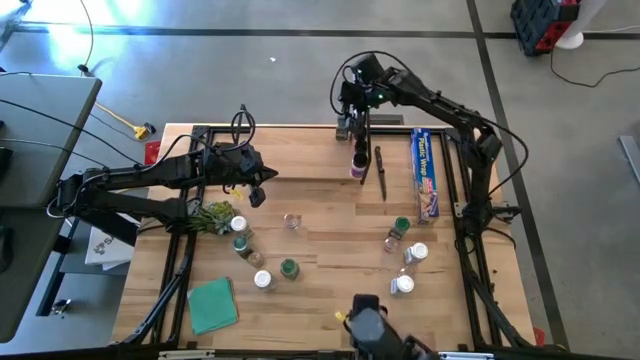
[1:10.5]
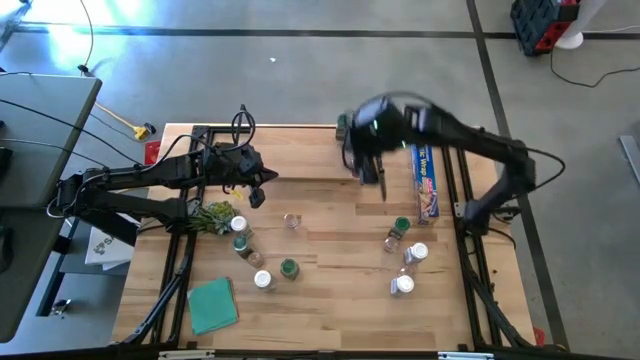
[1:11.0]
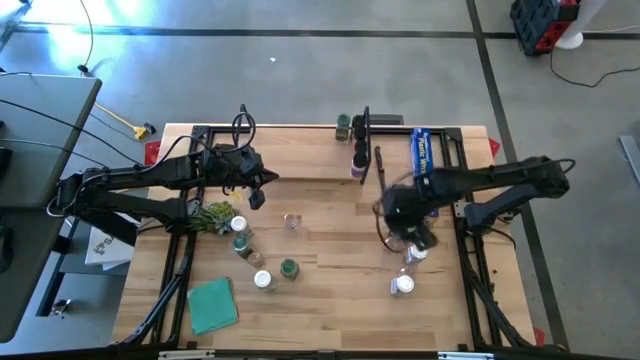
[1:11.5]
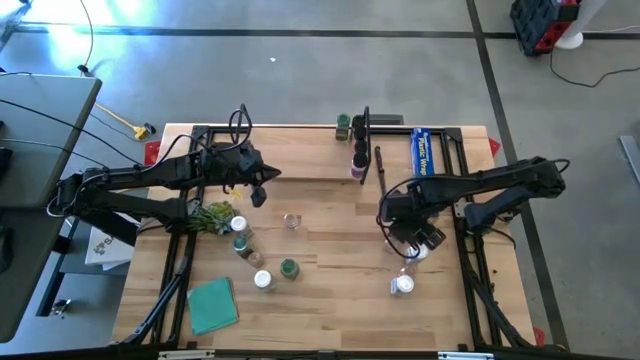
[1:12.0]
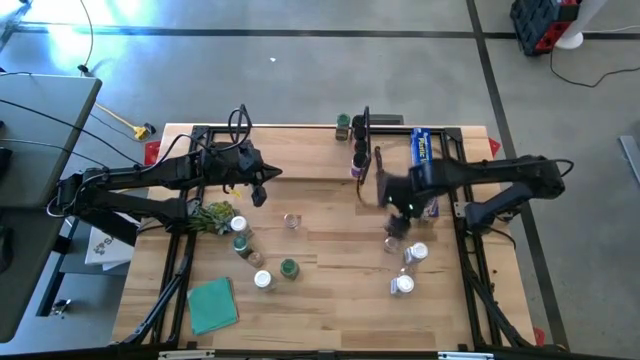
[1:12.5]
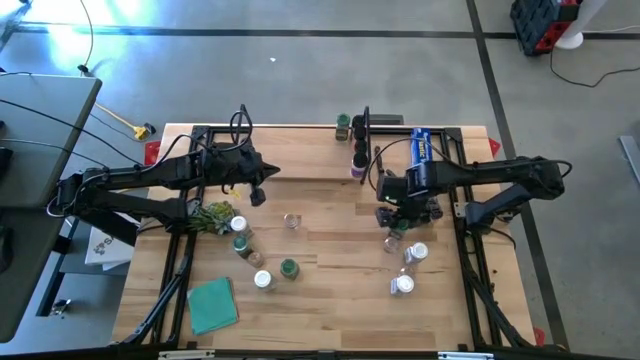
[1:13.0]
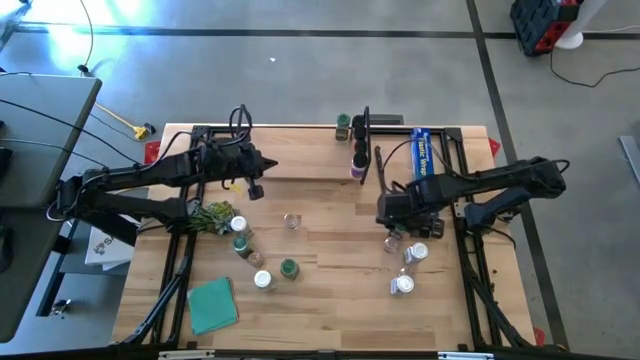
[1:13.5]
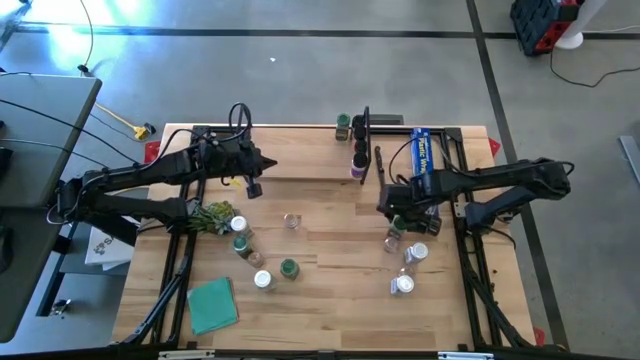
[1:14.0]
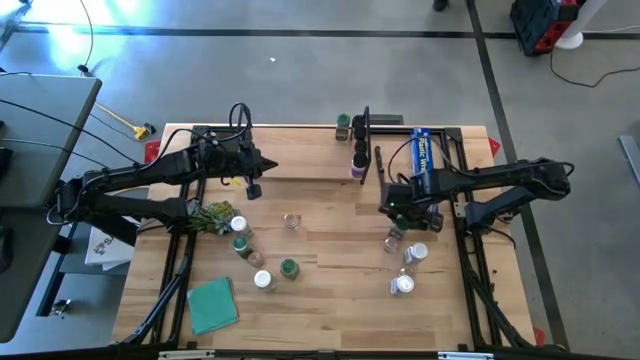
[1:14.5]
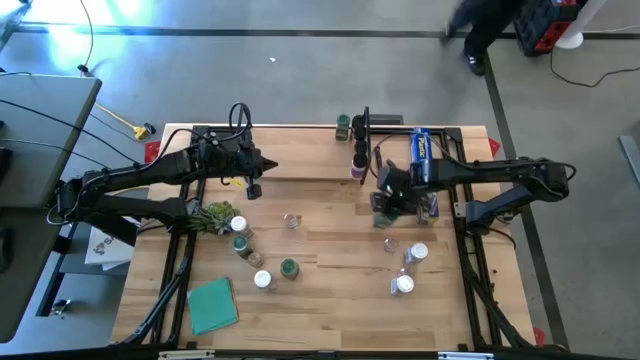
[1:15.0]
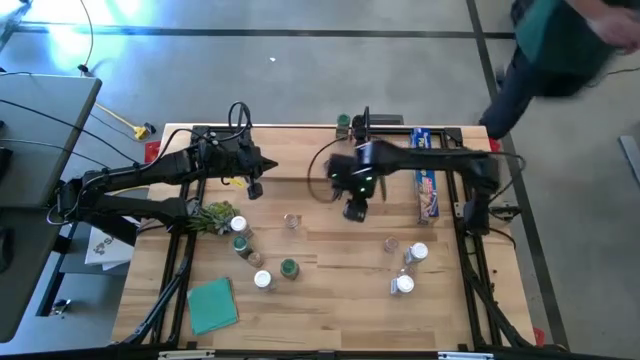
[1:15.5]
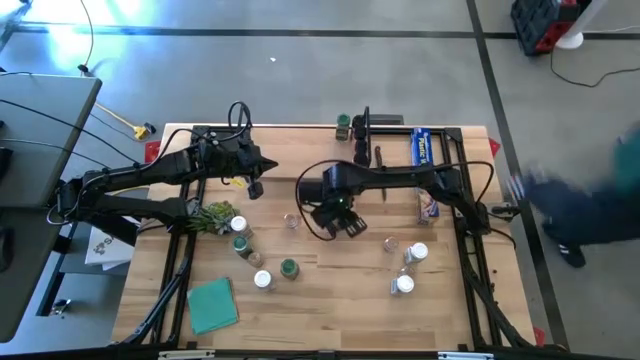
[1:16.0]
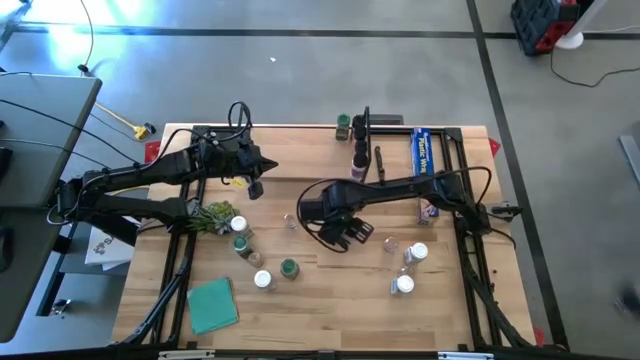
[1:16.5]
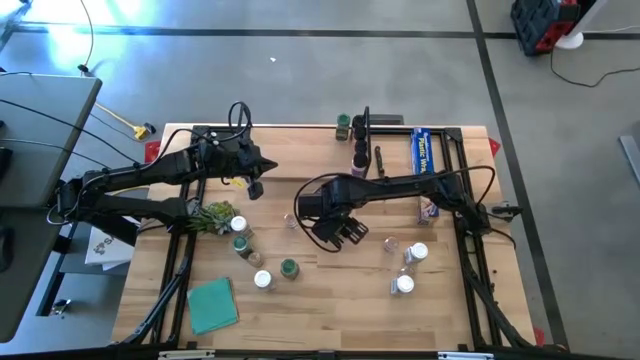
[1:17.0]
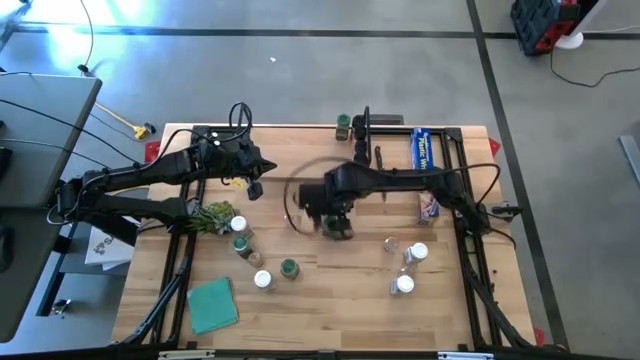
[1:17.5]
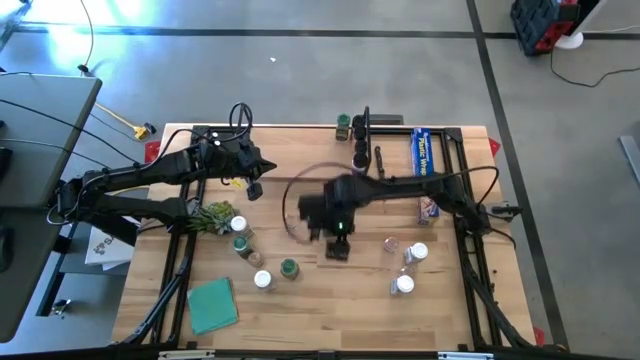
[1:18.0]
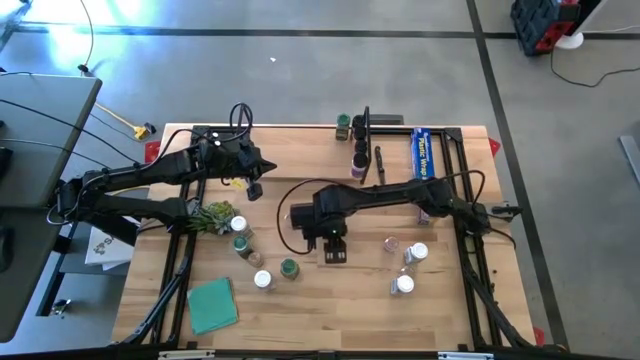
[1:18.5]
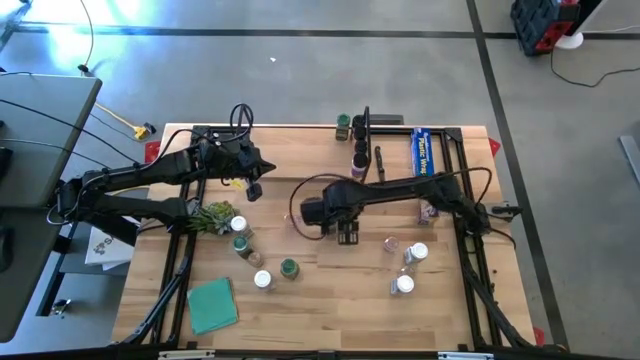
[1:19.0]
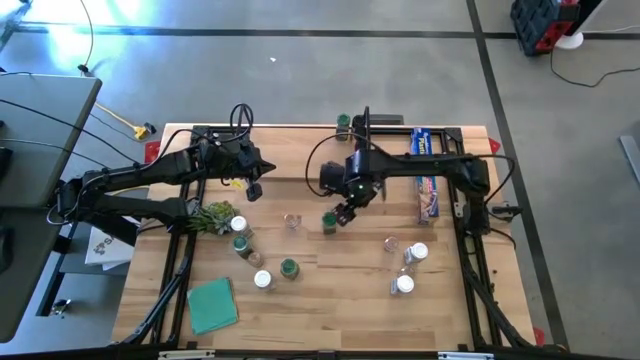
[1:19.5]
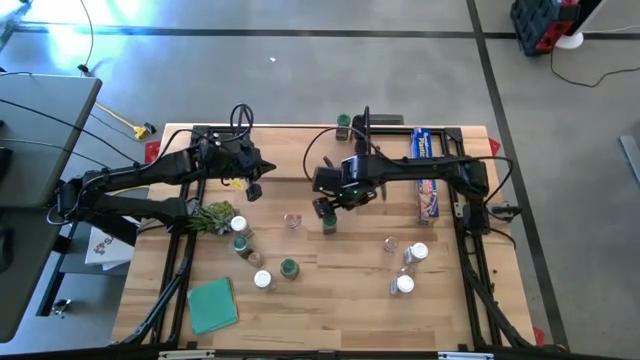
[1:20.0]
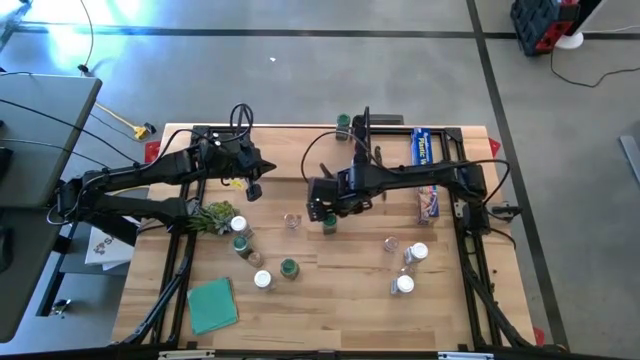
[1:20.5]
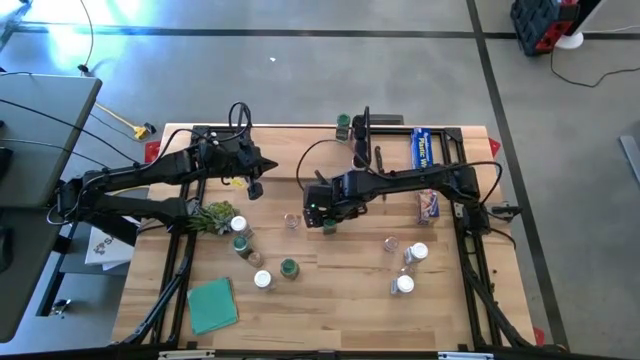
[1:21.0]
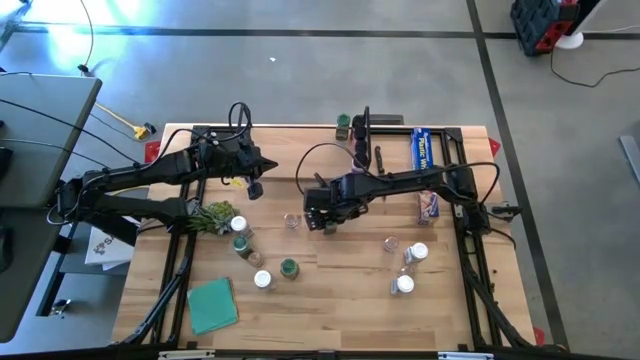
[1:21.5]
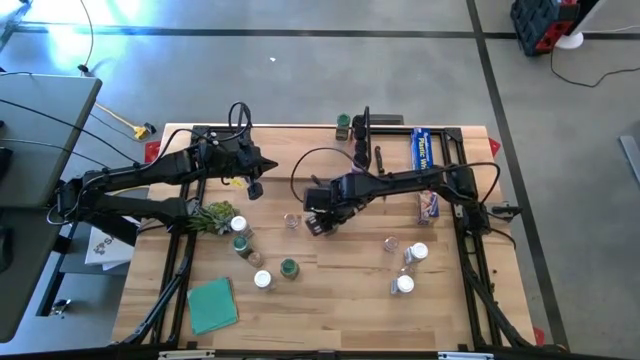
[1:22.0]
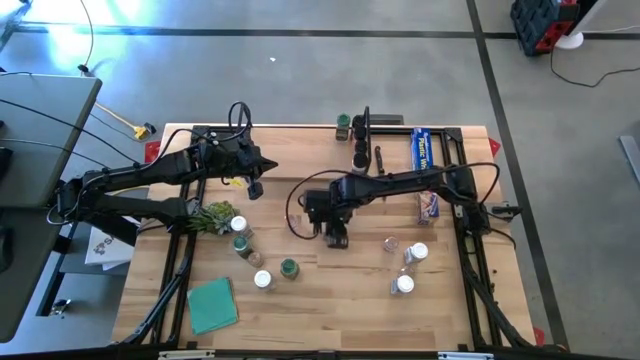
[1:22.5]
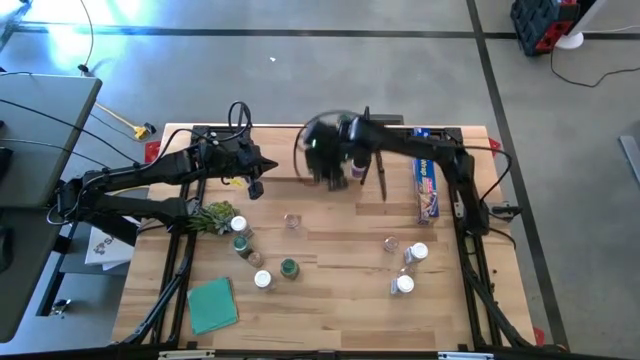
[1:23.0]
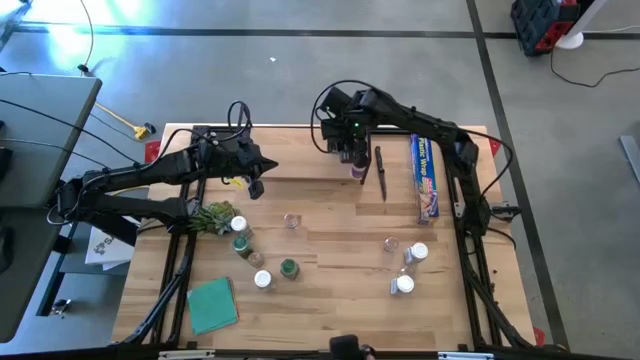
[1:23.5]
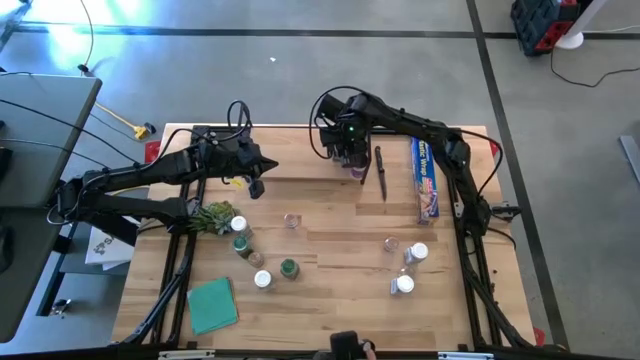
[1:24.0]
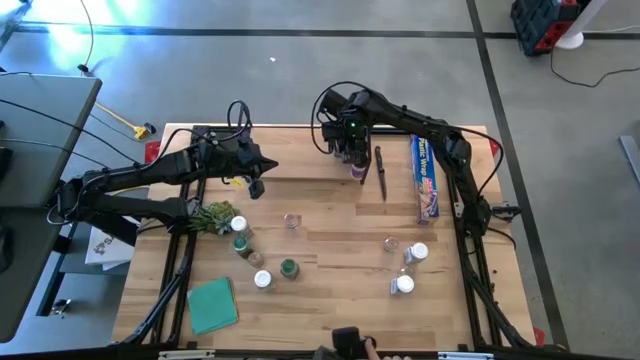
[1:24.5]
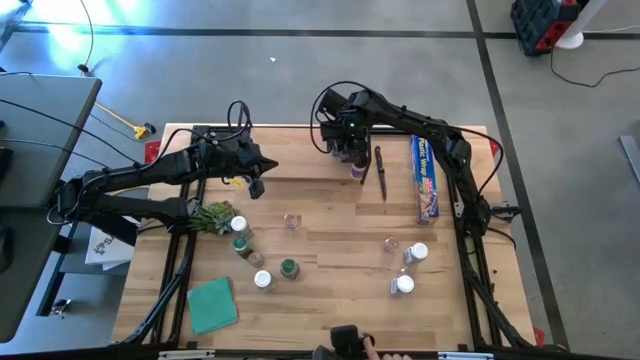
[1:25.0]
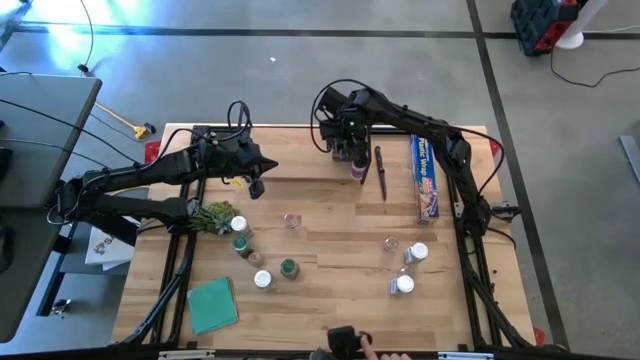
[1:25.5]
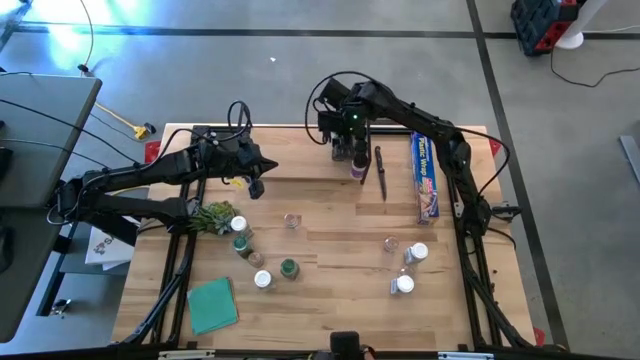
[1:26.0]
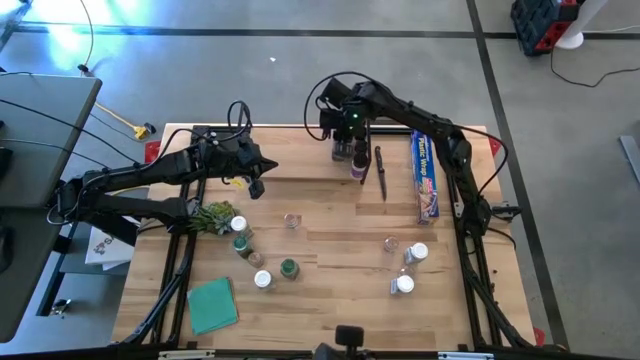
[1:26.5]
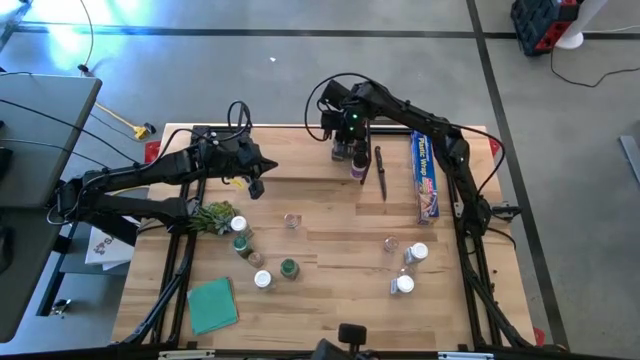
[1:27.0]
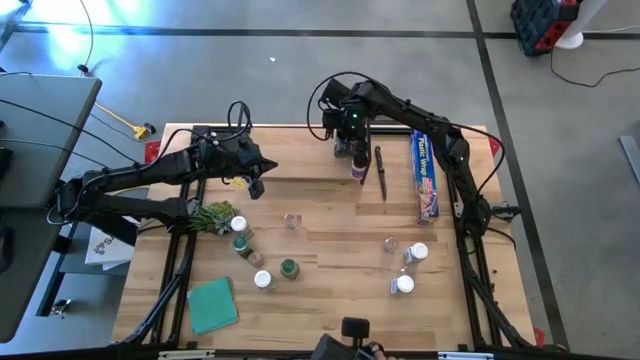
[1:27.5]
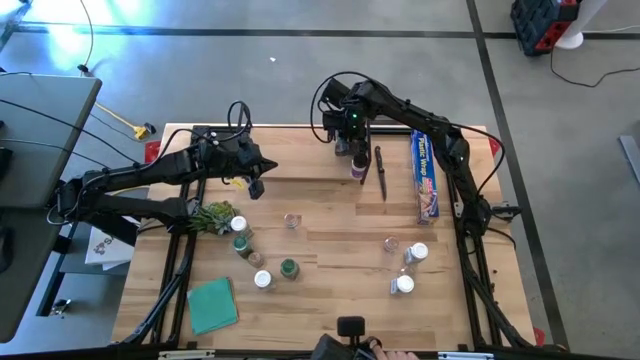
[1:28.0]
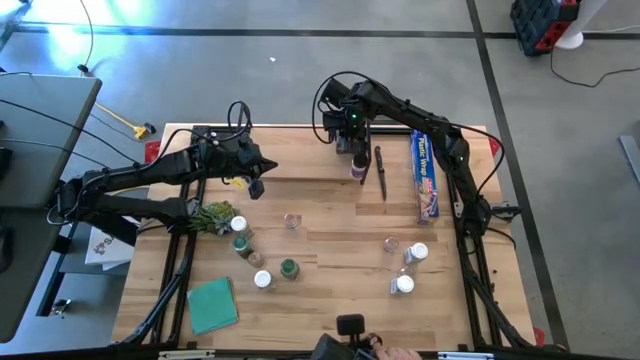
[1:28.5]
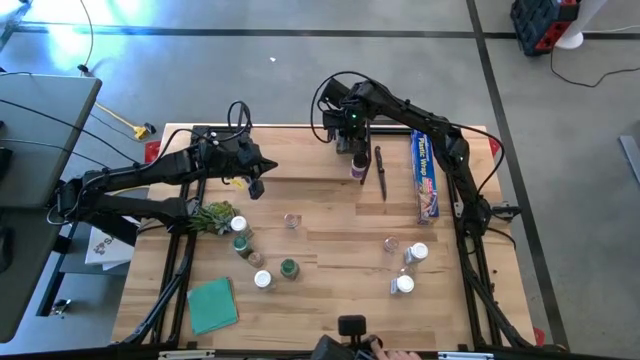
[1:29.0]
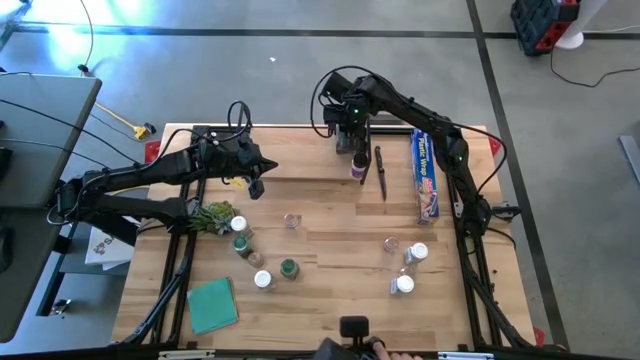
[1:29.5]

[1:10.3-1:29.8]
Task: Shelf spices
Put the green seasoning bottle on the shelf aligned with the other green seasoning bottle
